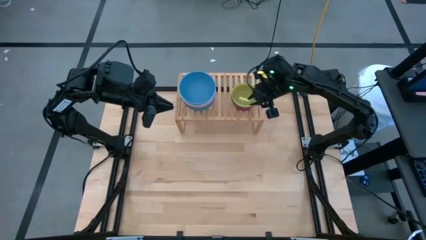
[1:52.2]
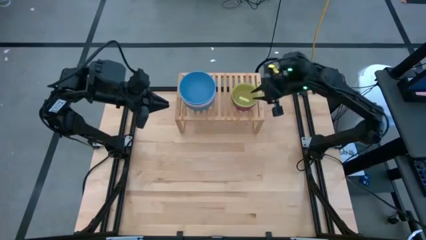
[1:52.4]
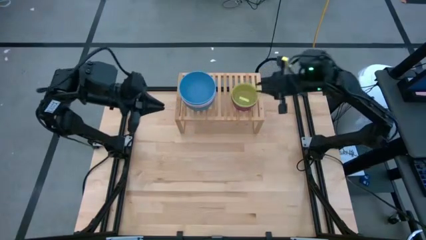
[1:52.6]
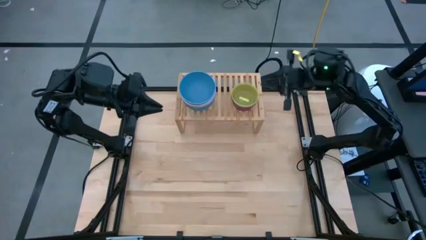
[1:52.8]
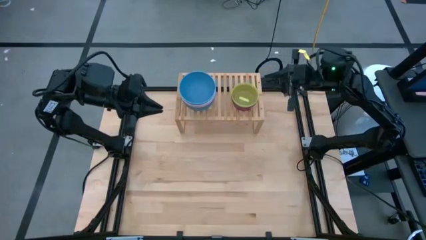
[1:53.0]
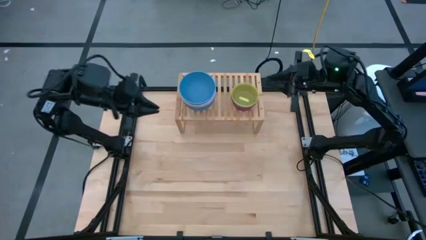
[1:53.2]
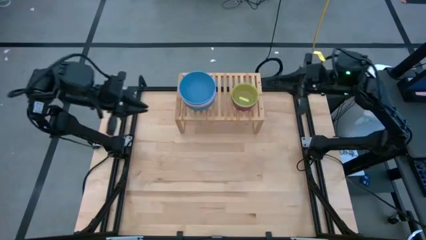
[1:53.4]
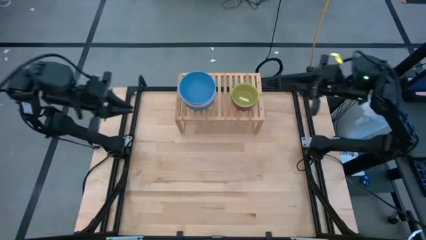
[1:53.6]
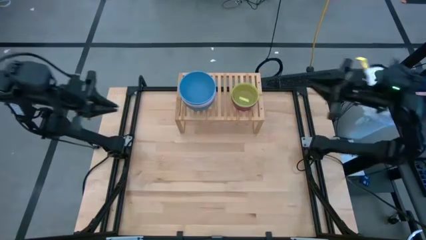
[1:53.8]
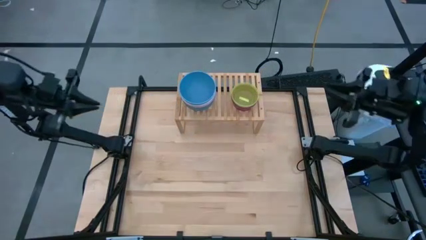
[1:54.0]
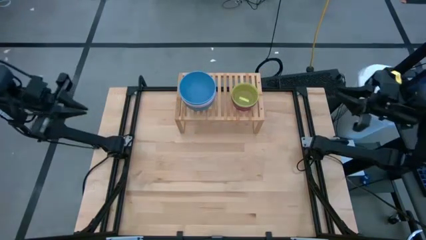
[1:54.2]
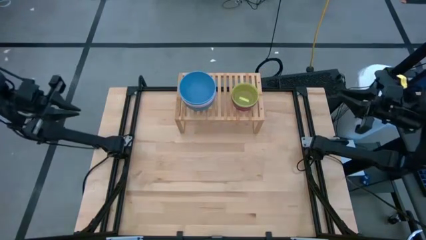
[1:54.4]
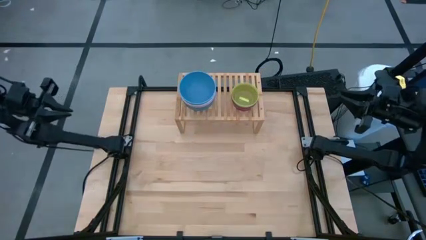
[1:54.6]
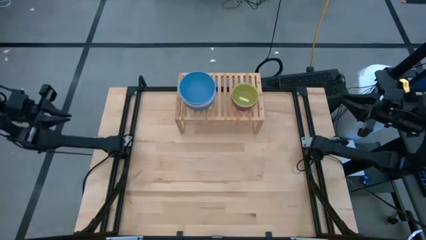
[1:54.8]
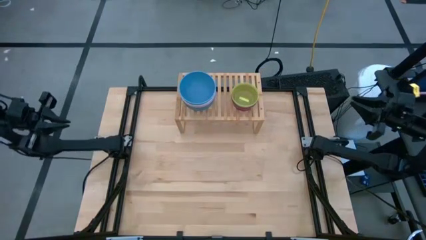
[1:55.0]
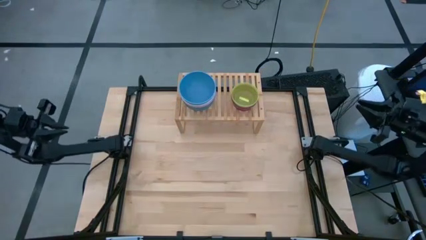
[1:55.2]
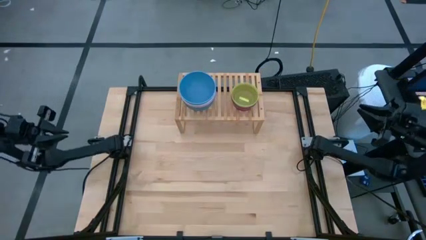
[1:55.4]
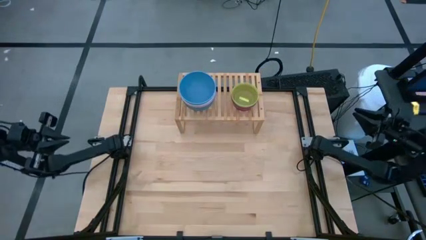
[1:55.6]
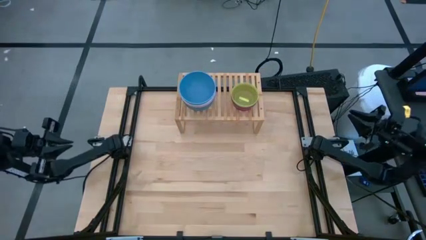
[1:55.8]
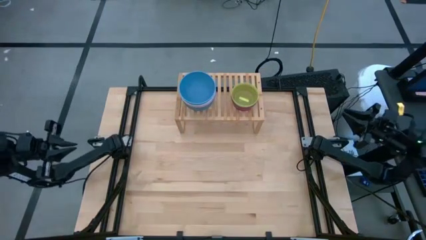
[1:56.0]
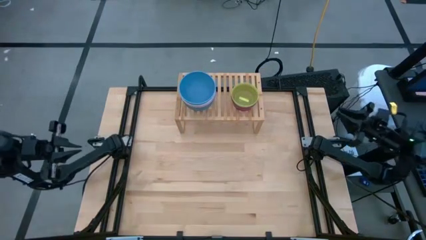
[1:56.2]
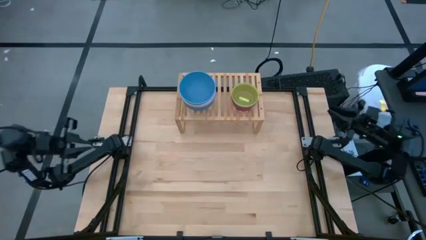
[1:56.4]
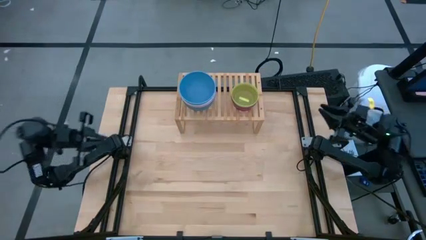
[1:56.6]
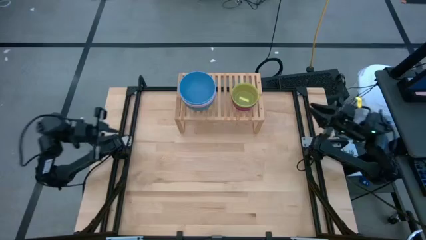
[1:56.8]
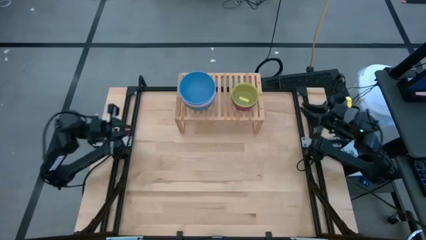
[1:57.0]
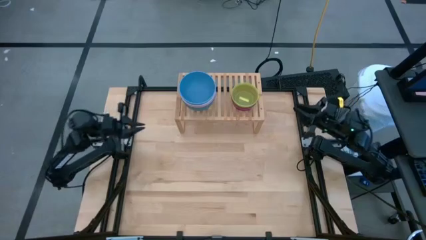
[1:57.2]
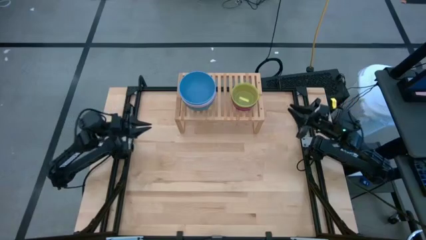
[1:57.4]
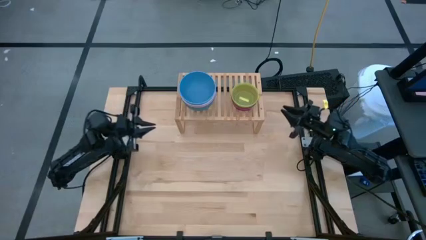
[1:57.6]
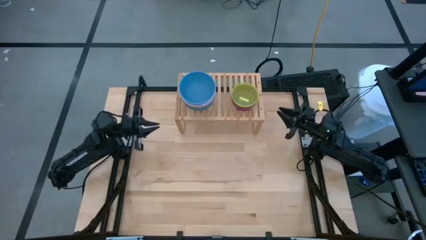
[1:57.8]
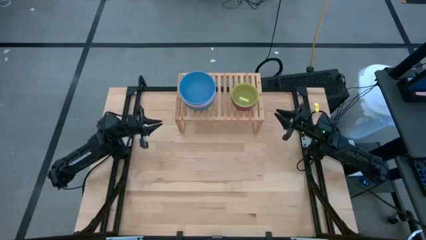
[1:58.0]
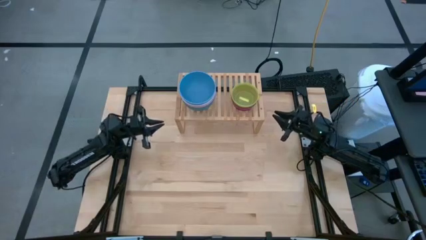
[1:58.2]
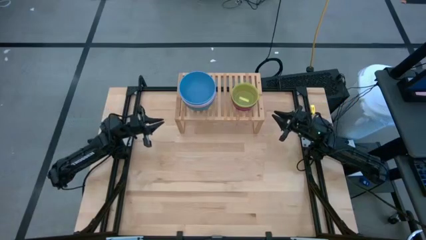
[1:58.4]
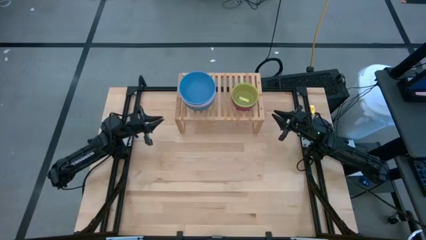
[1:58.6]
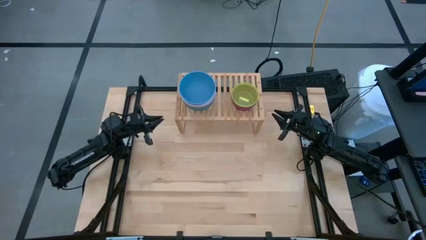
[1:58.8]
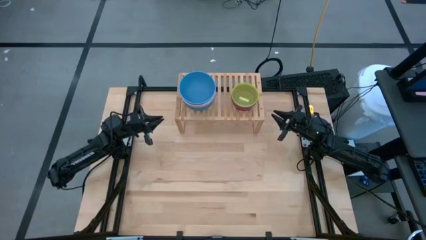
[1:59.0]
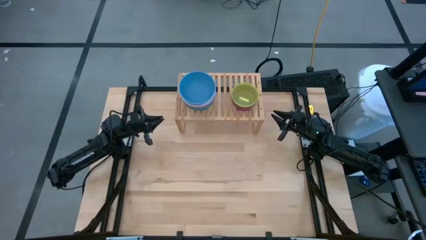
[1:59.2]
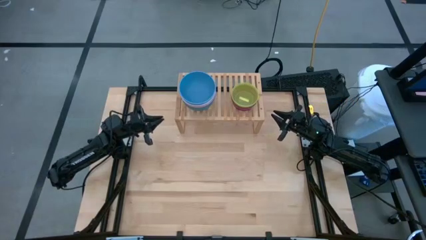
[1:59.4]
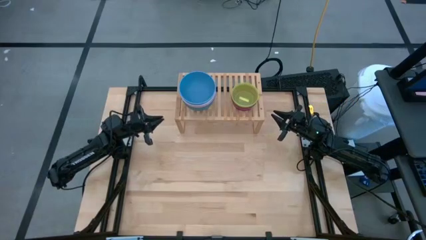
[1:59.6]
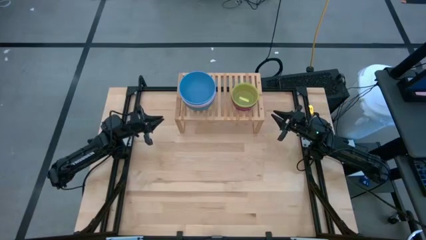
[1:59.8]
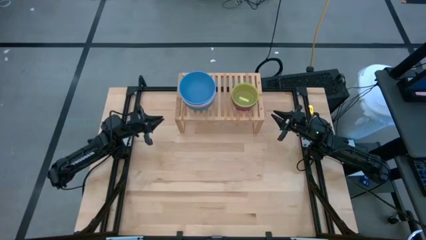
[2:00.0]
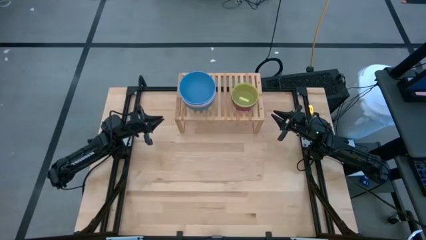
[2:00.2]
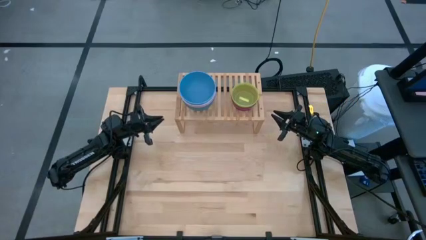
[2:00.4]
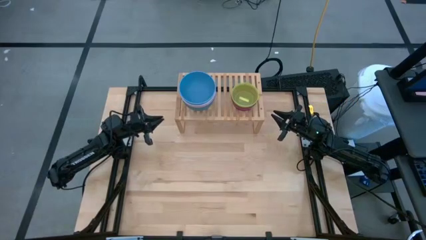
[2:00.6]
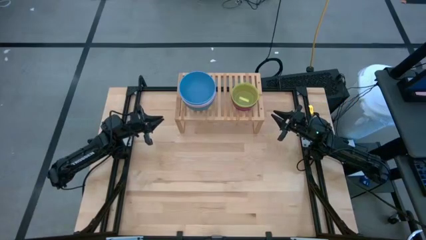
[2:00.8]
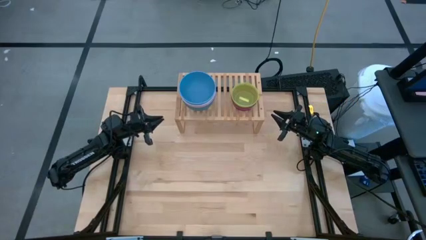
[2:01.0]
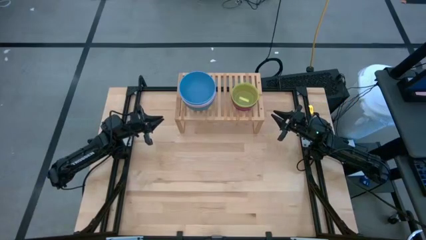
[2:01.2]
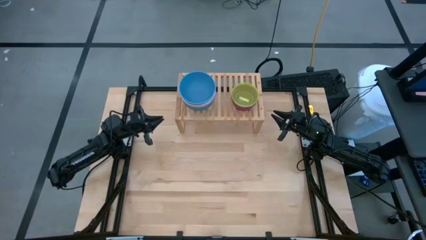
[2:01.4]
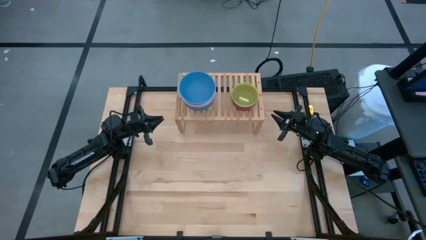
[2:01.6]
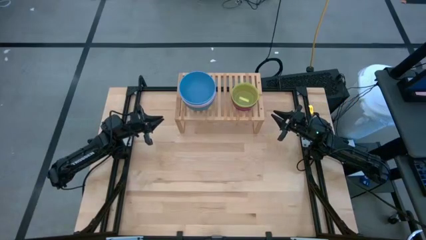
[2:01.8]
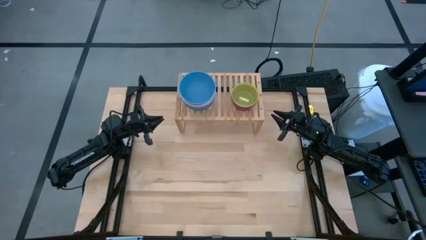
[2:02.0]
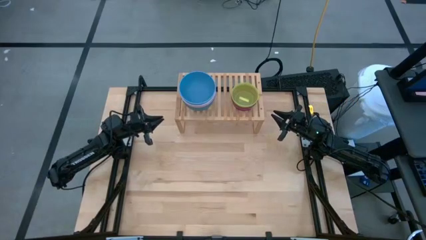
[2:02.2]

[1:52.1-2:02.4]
Task: Place and stack bowls onto a shelf
Return to Home Position

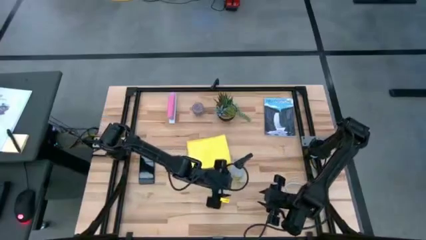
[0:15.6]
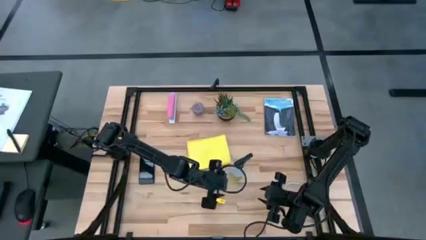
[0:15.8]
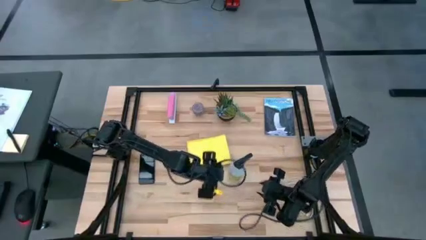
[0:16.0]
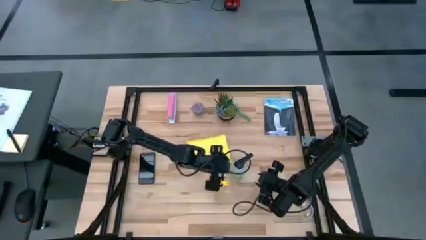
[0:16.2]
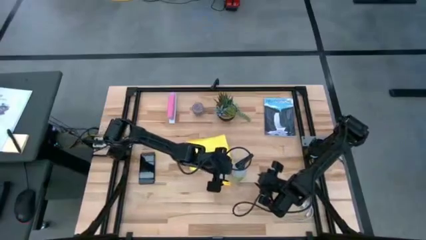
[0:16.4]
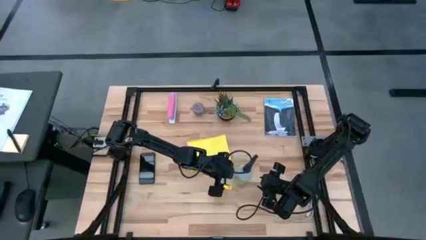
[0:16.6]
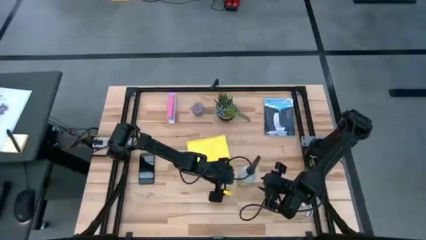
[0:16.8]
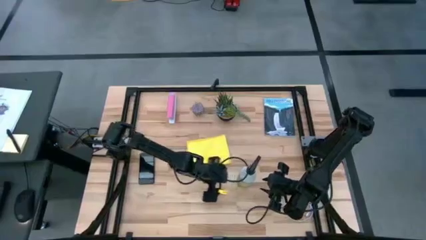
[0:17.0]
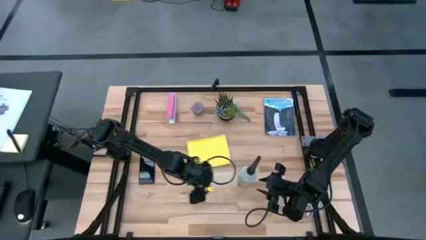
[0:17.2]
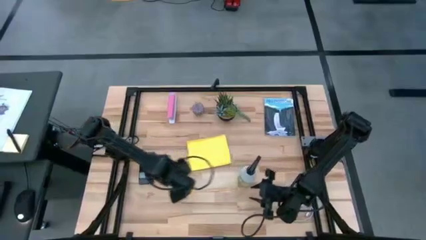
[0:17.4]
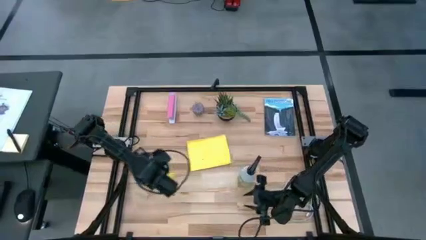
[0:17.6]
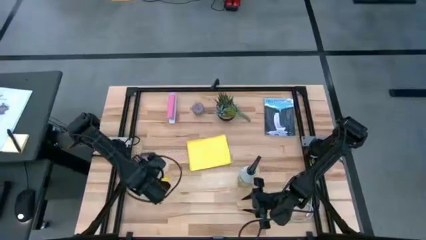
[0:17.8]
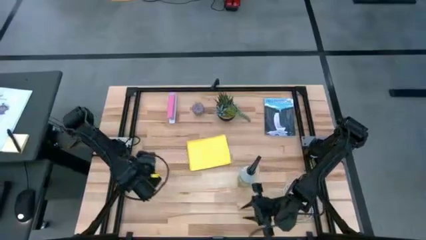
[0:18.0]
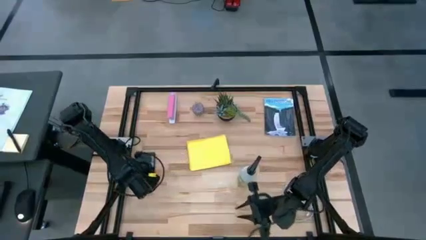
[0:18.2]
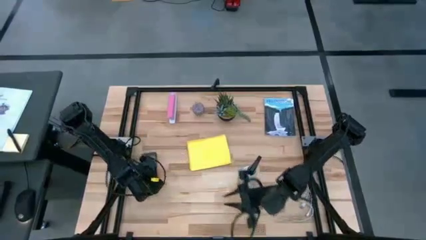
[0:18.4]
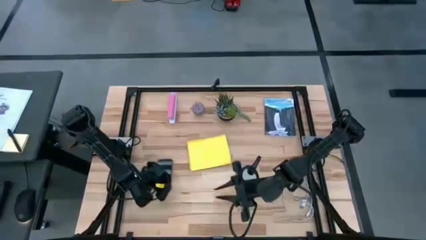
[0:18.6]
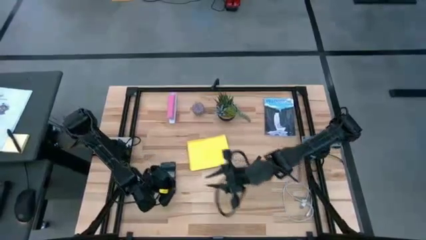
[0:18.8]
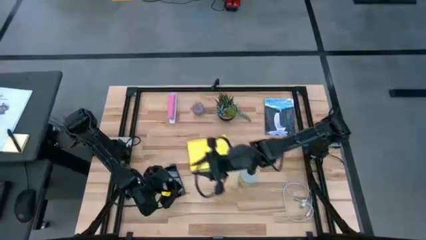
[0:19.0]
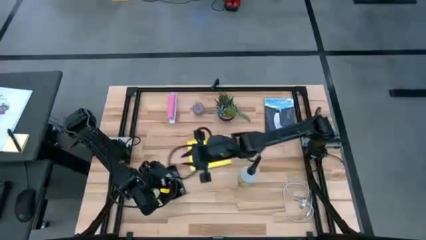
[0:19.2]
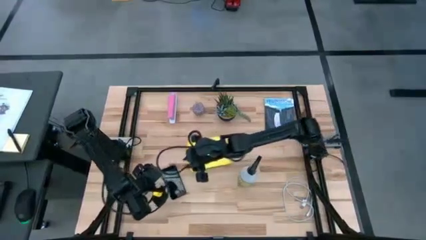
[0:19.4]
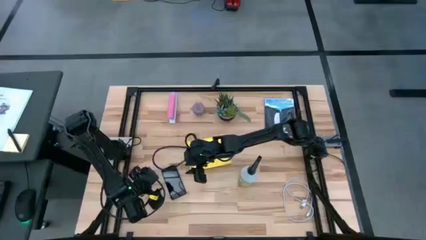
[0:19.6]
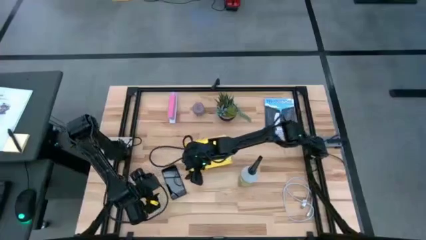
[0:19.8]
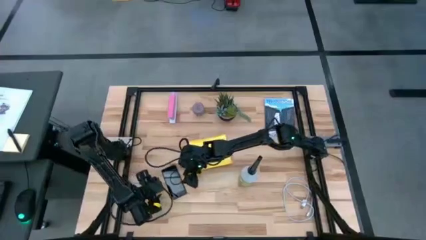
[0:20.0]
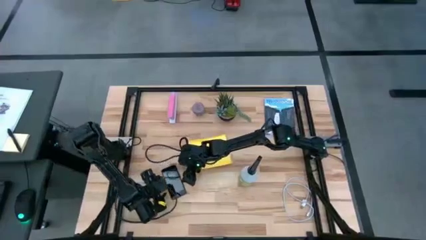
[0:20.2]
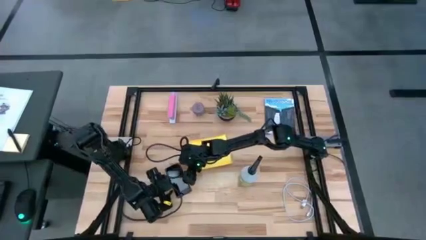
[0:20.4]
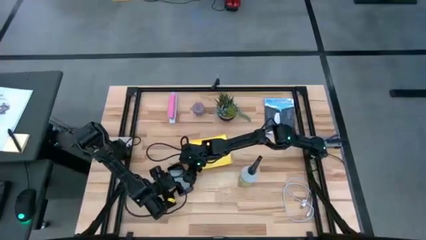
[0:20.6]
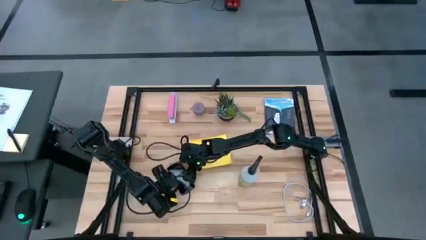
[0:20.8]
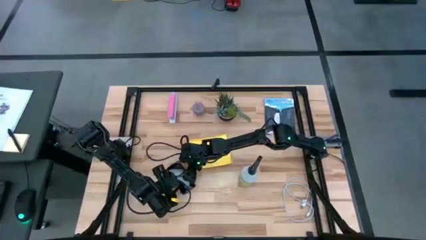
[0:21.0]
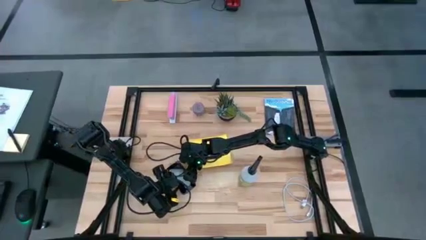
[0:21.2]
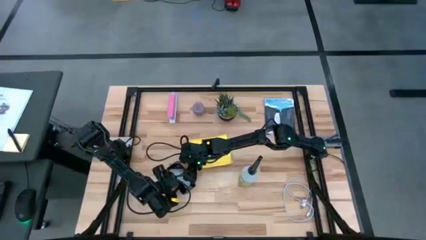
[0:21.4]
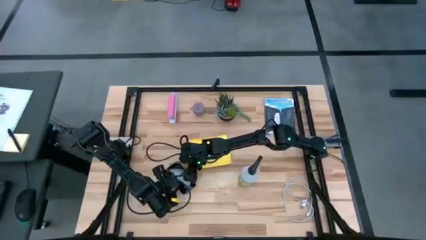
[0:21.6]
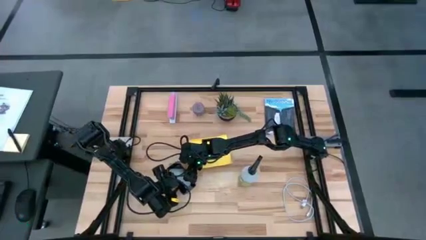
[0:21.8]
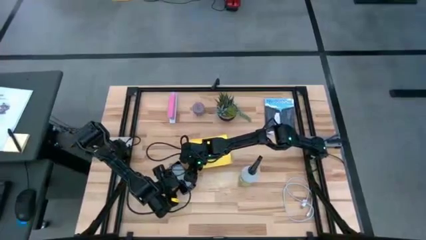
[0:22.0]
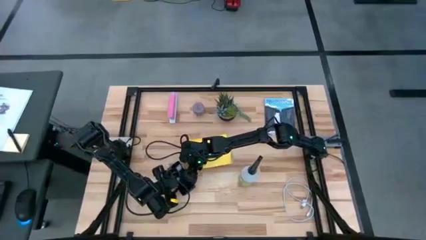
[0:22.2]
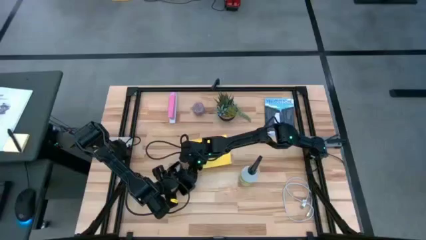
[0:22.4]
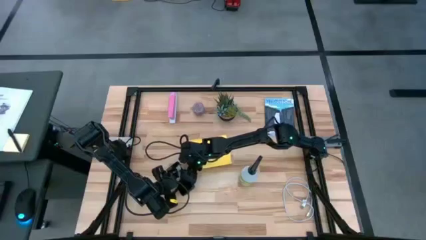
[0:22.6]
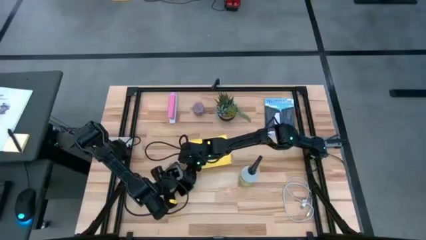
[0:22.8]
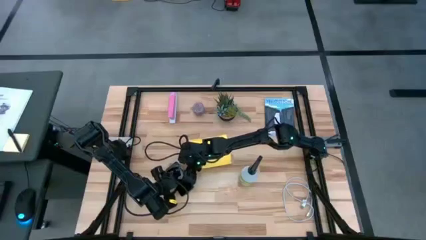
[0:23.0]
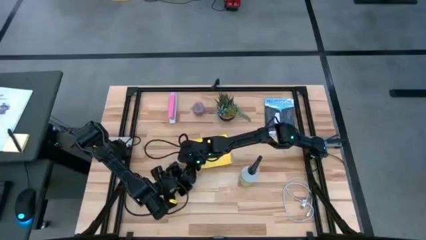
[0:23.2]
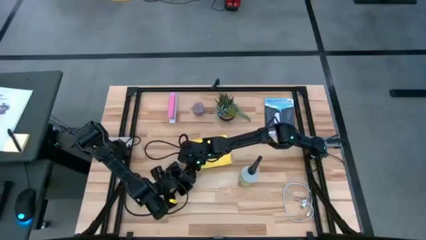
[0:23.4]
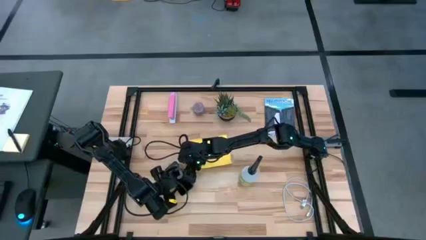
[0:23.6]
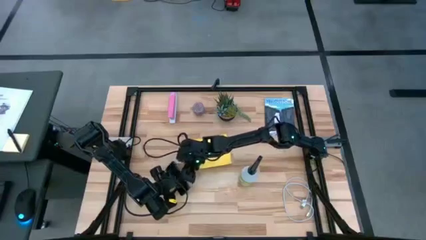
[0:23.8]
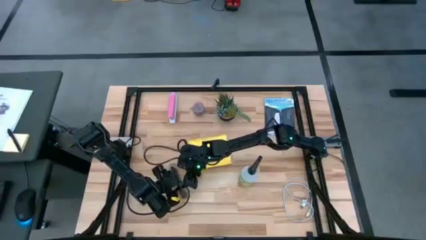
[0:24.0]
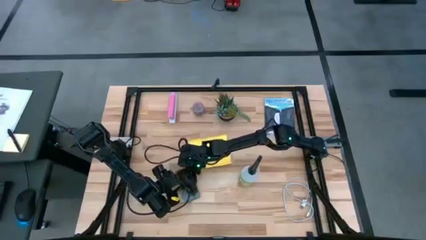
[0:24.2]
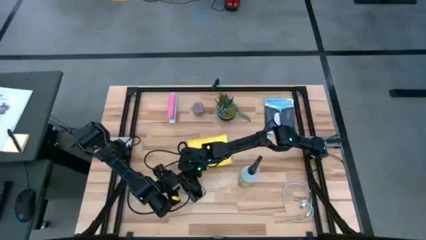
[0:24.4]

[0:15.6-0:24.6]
Task: Apply microfiber cloth
Spray the back of the cellphone with the spray bottle
